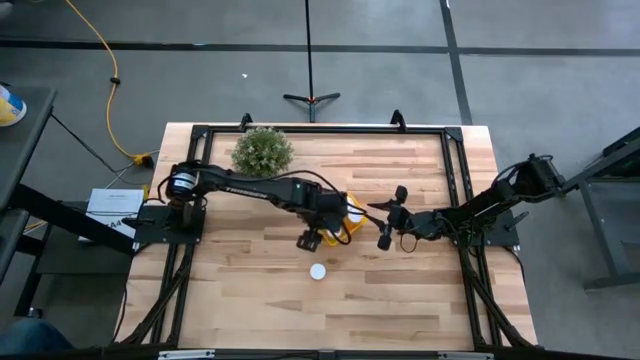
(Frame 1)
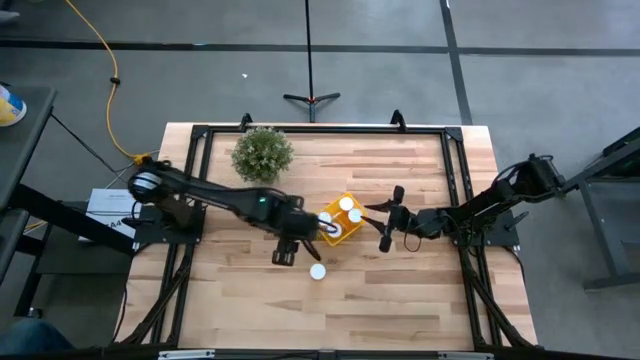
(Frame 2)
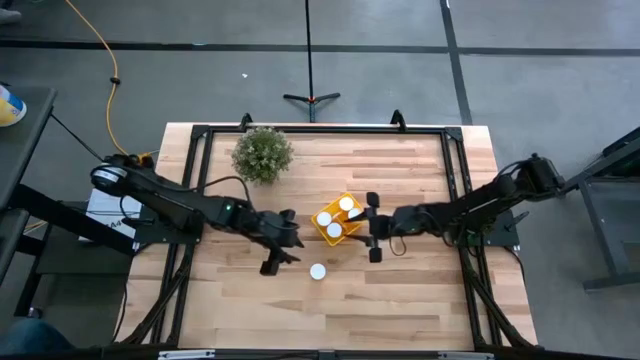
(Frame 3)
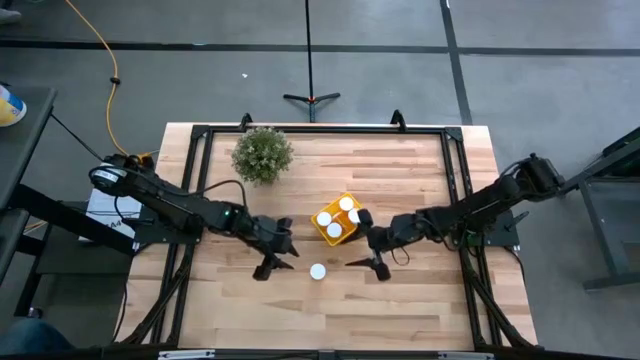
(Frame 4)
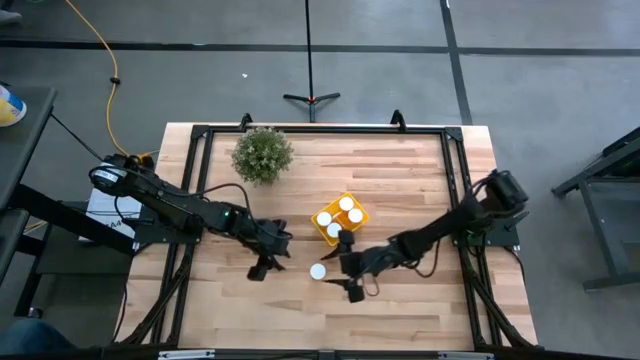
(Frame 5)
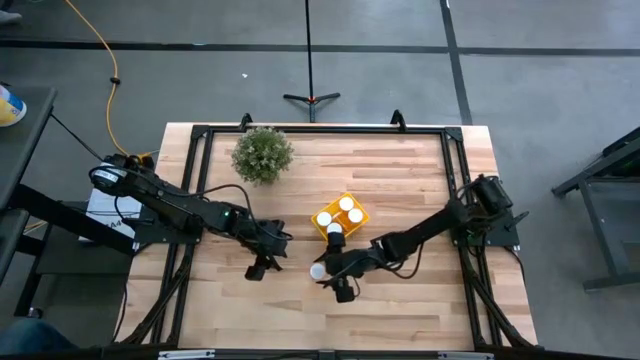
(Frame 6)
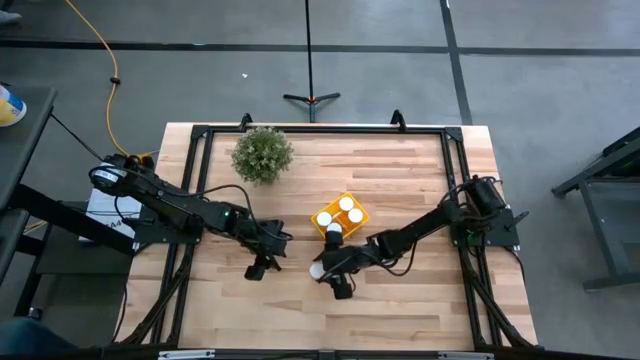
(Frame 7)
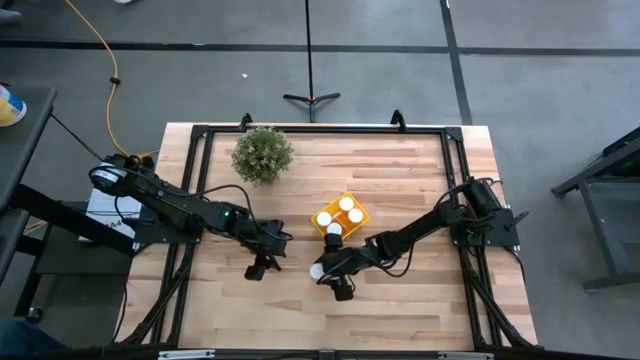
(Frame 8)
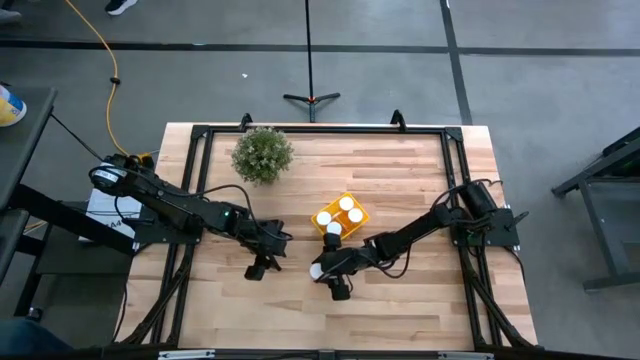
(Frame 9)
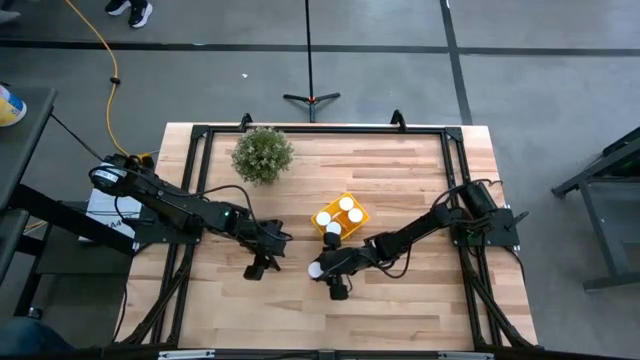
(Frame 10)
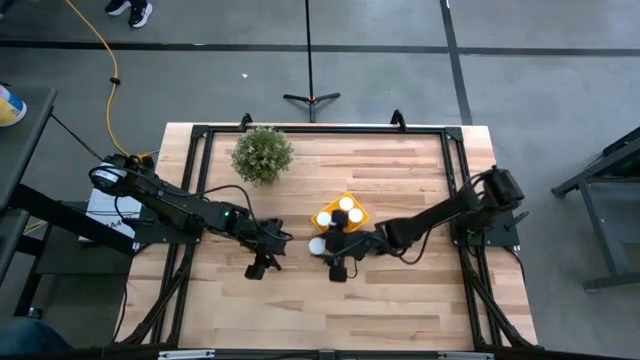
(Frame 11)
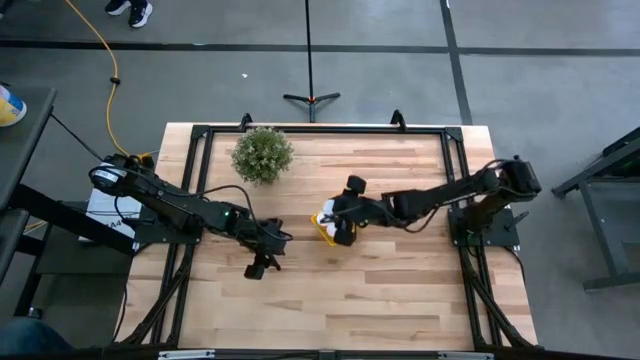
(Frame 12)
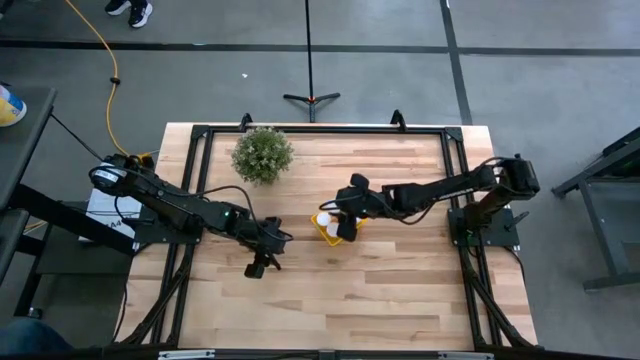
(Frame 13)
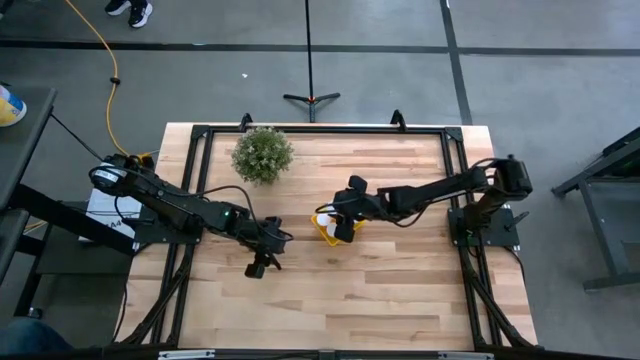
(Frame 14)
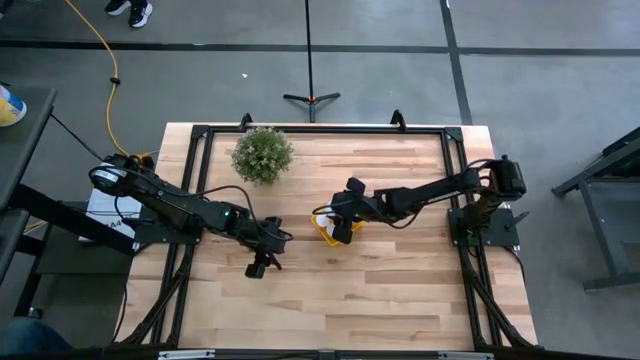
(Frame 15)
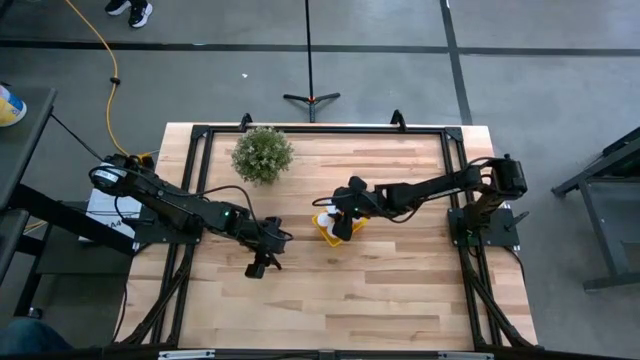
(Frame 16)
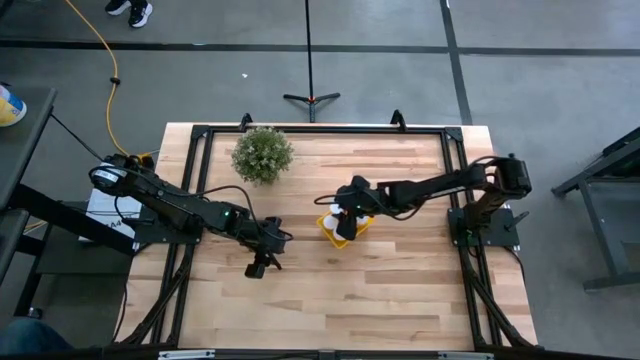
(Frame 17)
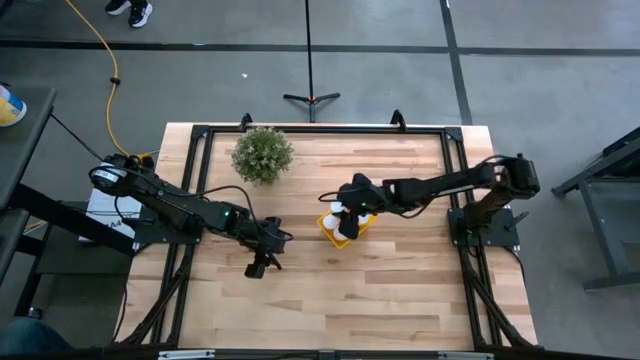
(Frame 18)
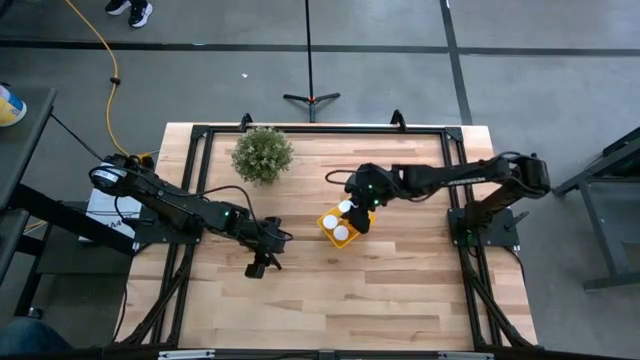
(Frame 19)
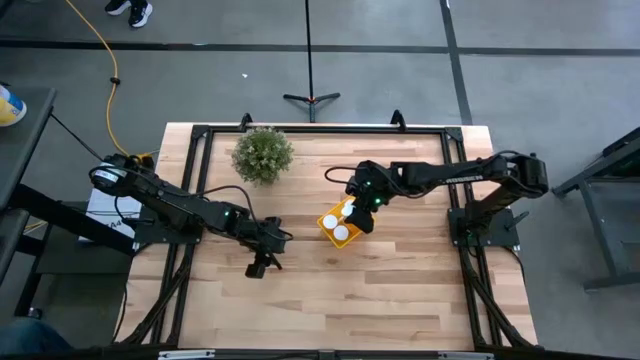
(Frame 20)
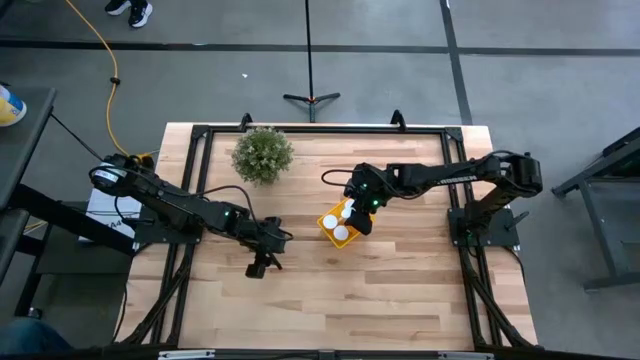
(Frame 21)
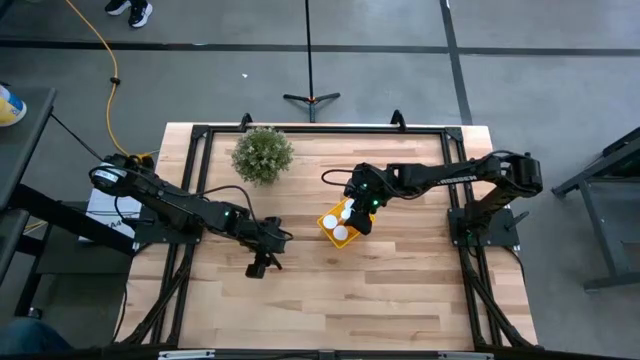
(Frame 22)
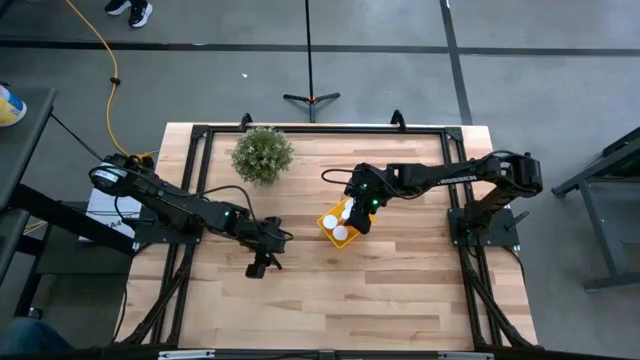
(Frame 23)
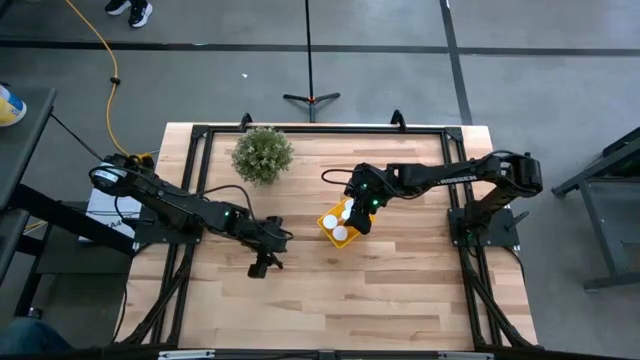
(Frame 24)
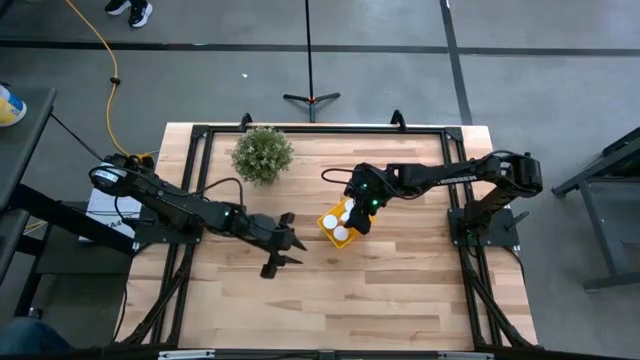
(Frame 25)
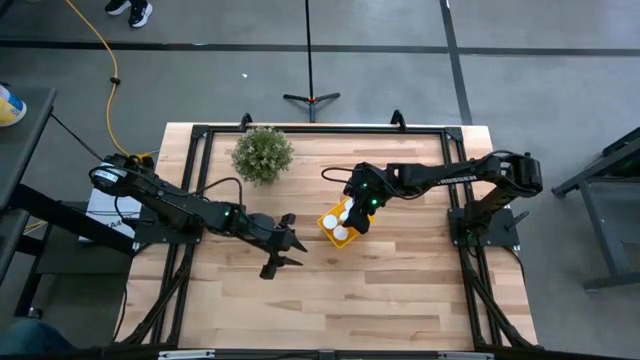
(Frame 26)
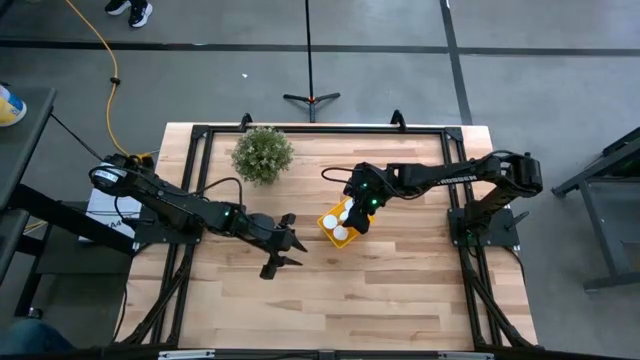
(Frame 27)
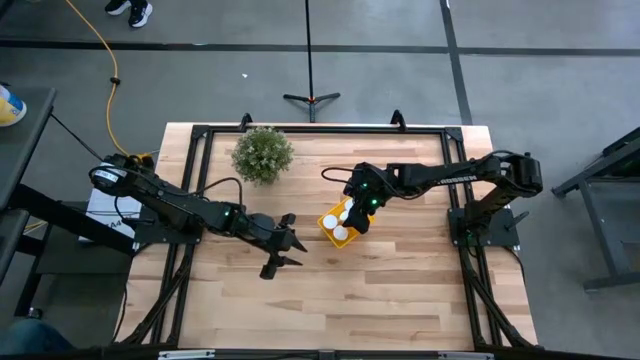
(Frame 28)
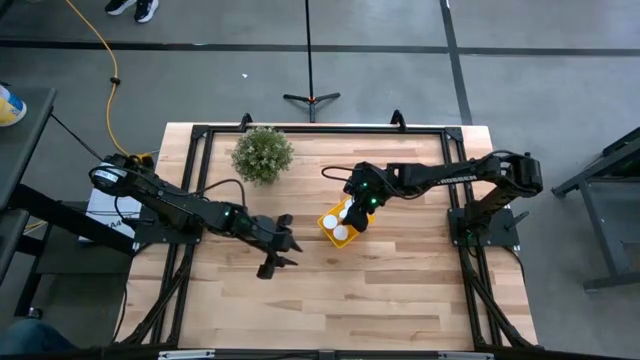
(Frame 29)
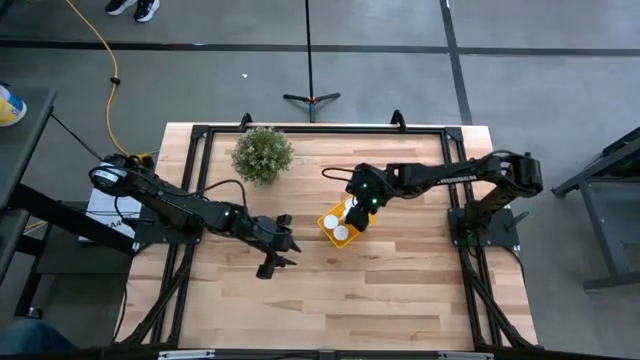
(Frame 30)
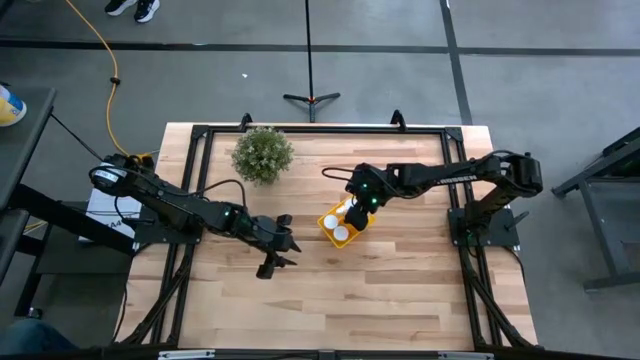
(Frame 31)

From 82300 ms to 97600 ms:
Task: Pick and place pill bottles into a basket
Put the orange pill bottle into middle of the yellow basket

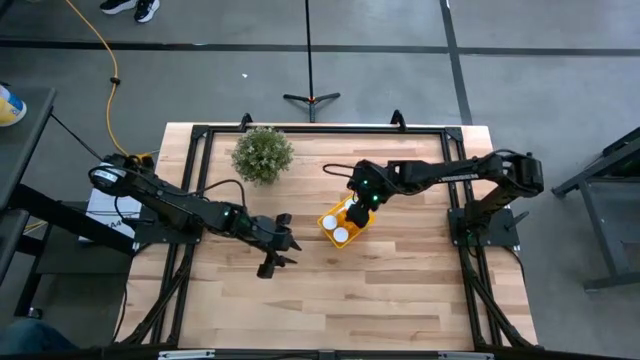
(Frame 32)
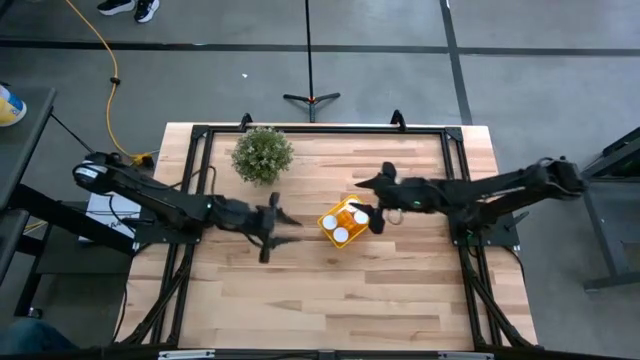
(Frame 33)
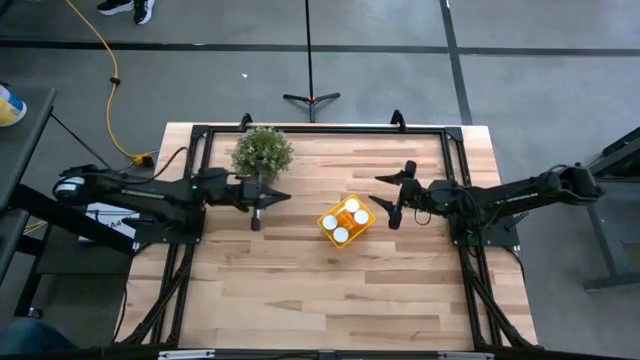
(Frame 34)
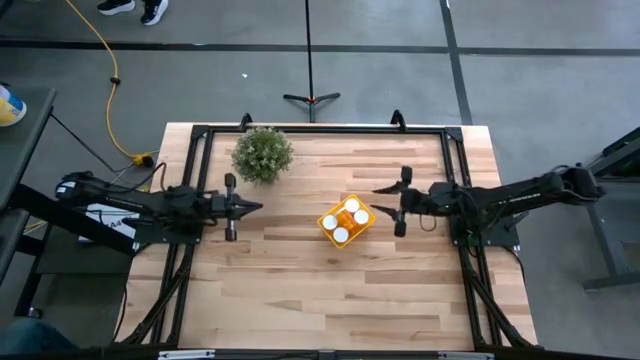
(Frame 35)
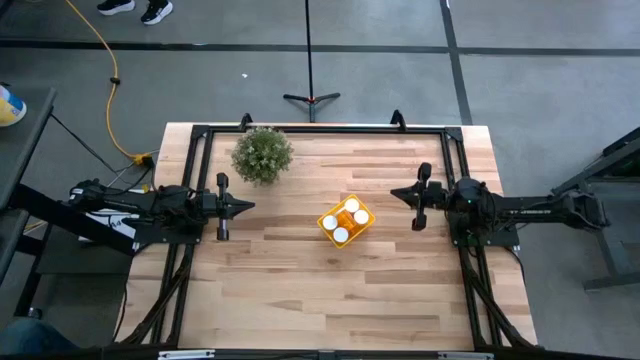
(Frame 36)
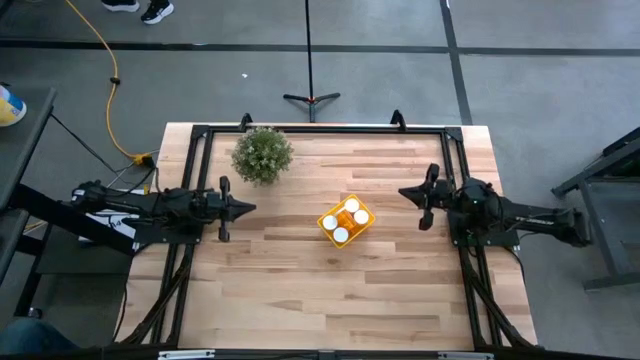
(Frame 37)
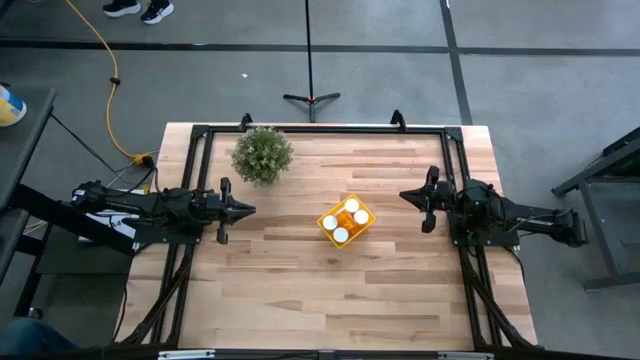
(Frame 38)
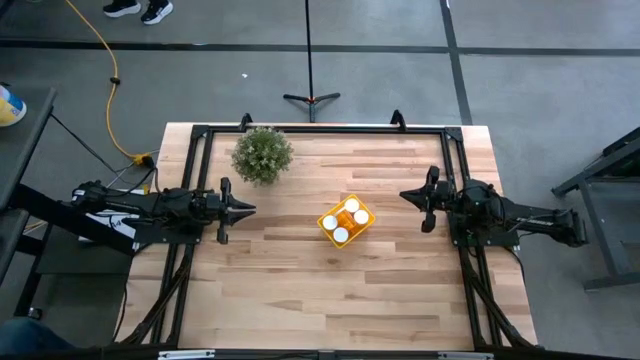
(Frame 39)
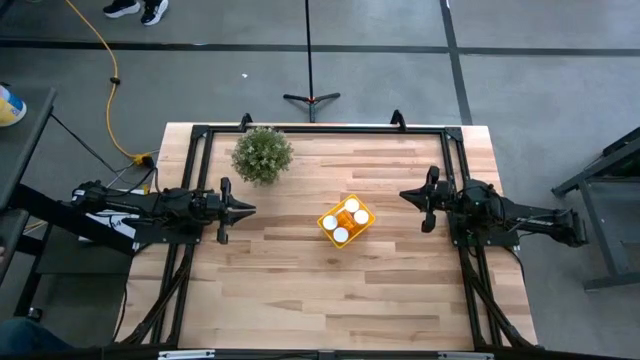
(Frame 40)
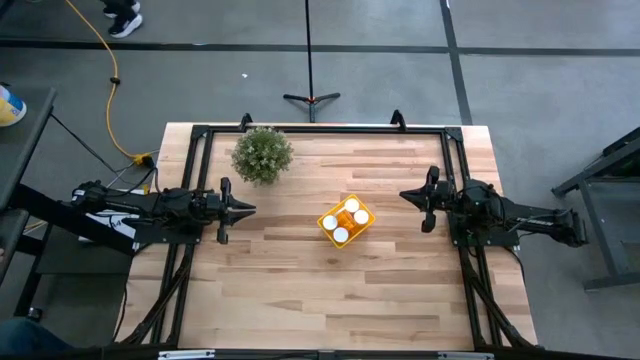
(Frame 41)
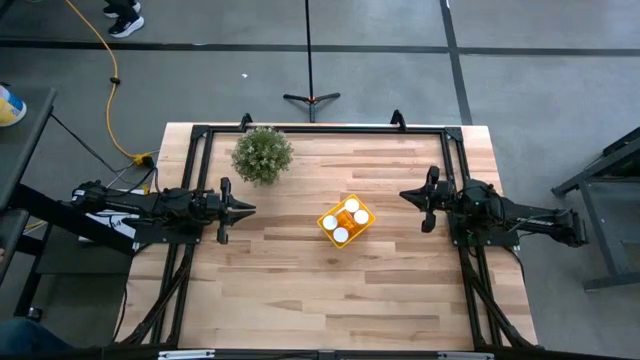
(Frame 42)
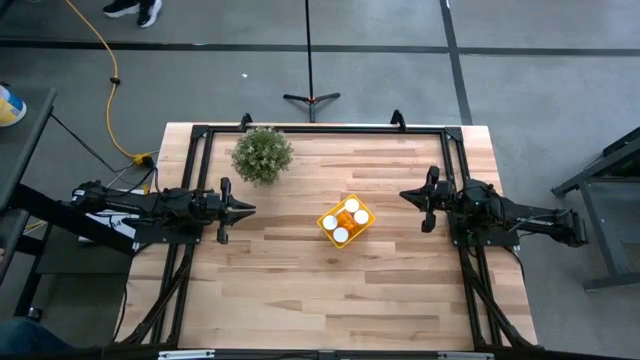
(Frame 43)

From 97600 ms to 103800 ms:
Return to Home Position
